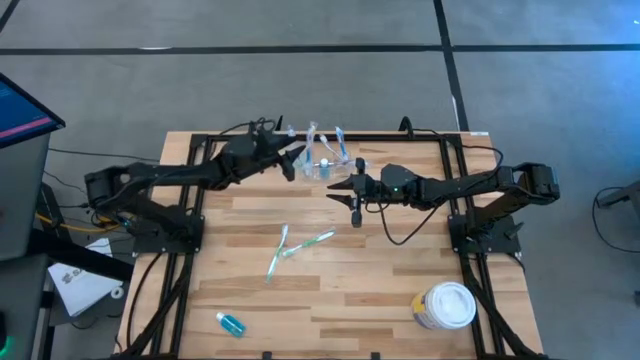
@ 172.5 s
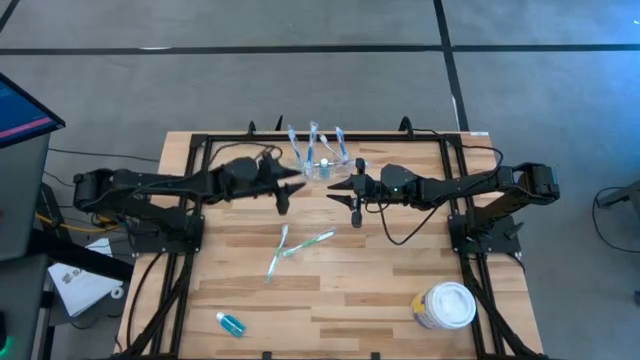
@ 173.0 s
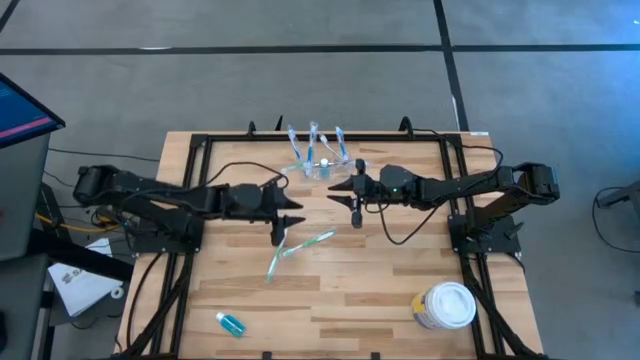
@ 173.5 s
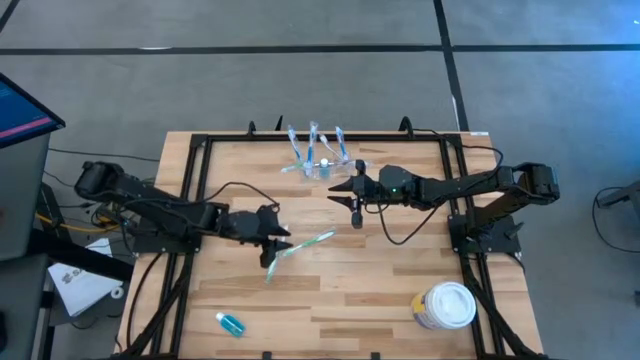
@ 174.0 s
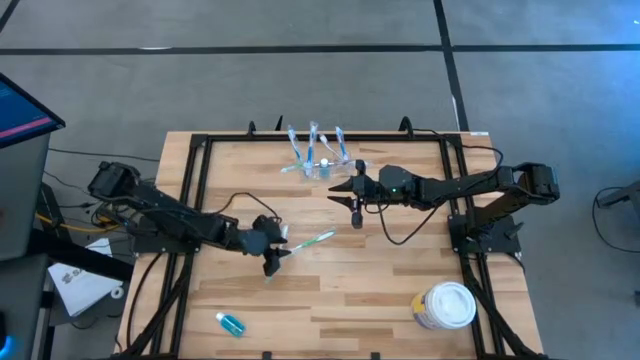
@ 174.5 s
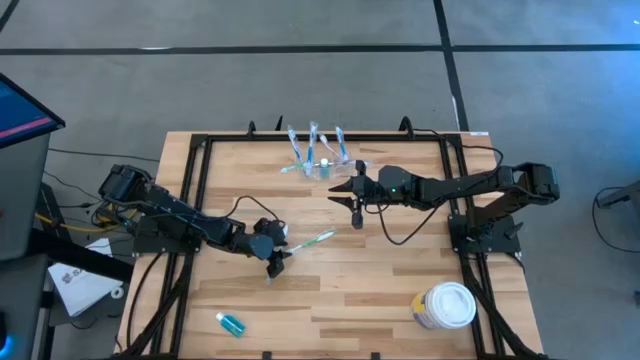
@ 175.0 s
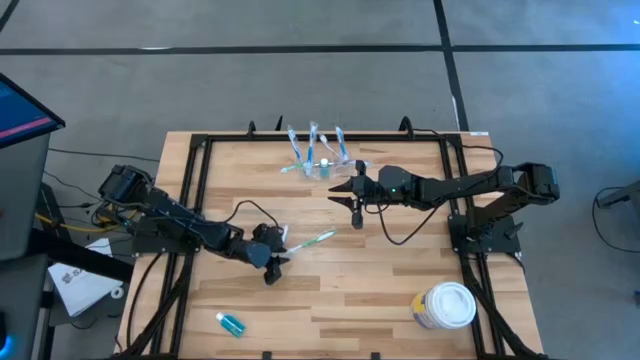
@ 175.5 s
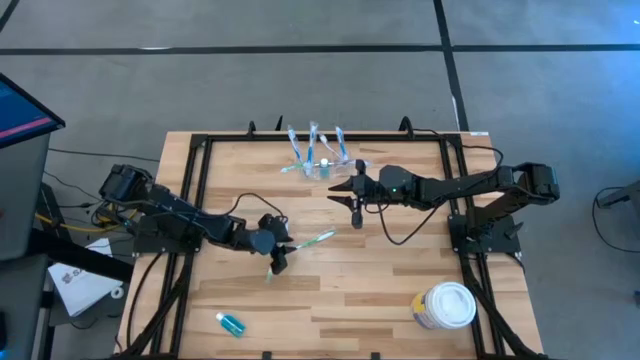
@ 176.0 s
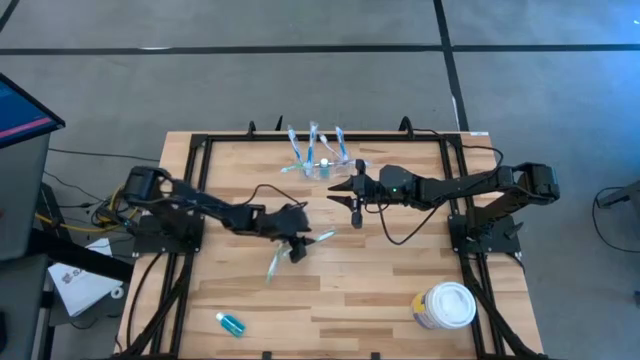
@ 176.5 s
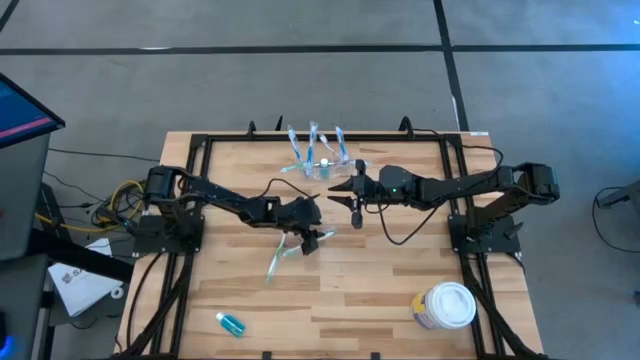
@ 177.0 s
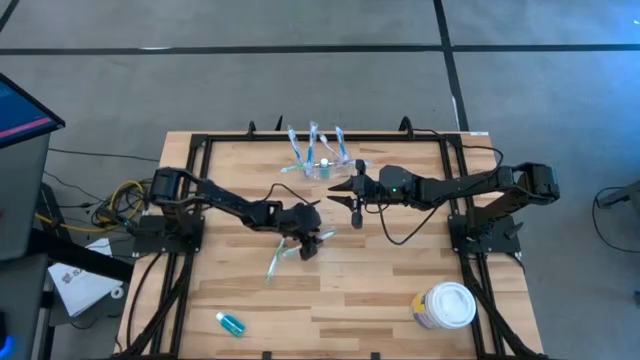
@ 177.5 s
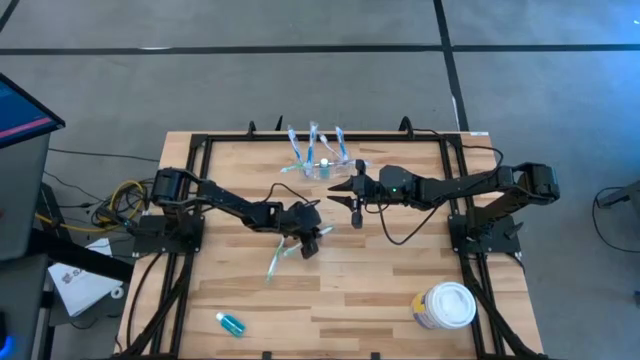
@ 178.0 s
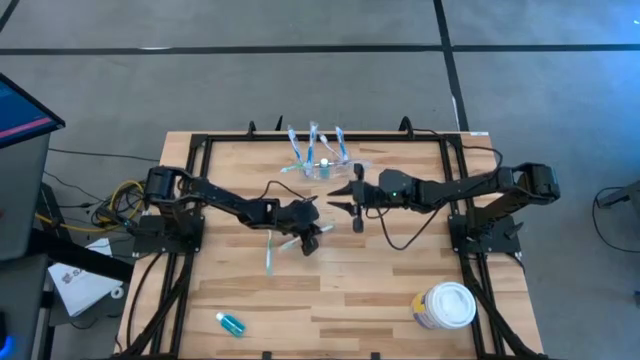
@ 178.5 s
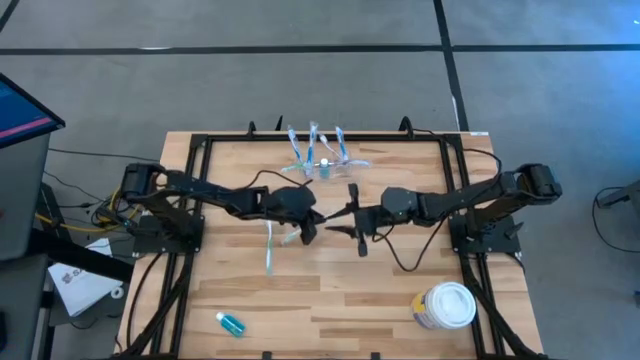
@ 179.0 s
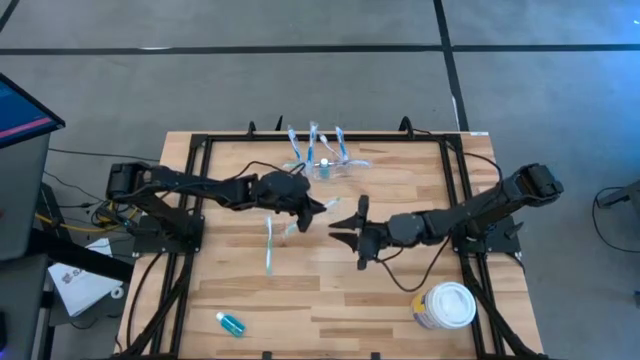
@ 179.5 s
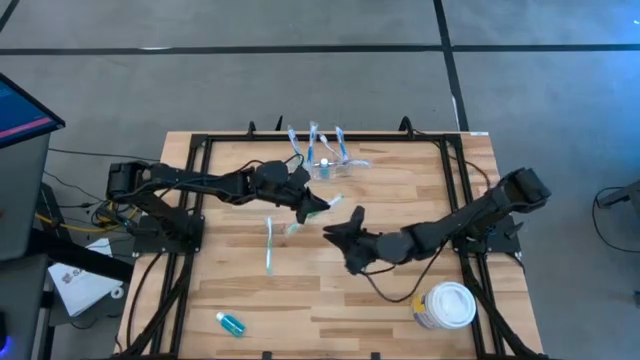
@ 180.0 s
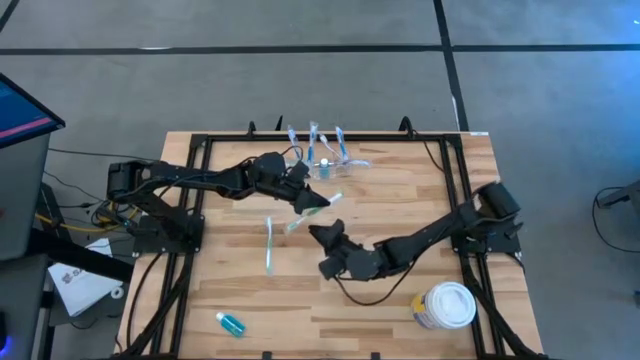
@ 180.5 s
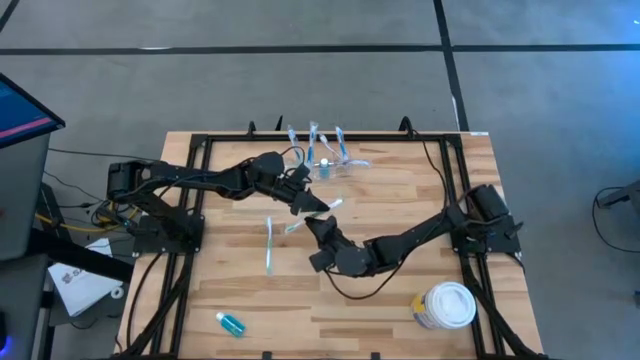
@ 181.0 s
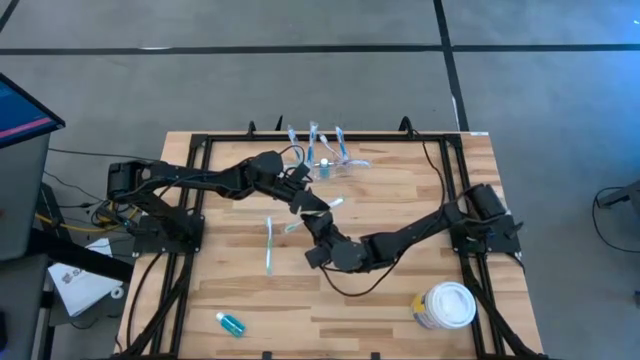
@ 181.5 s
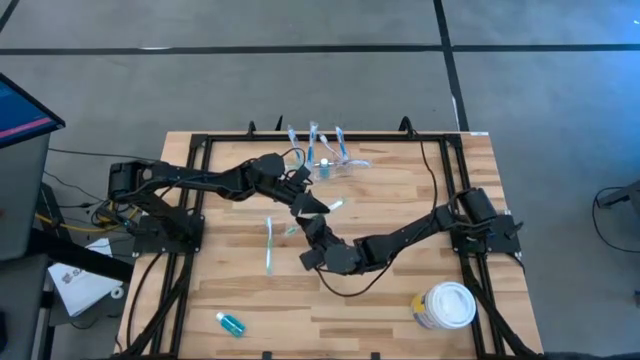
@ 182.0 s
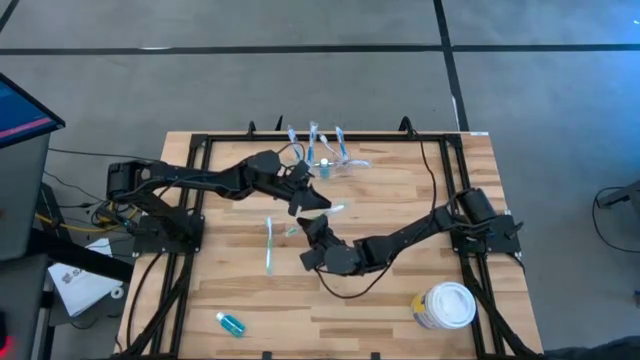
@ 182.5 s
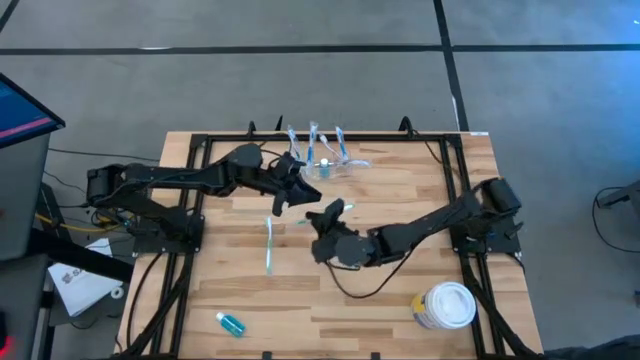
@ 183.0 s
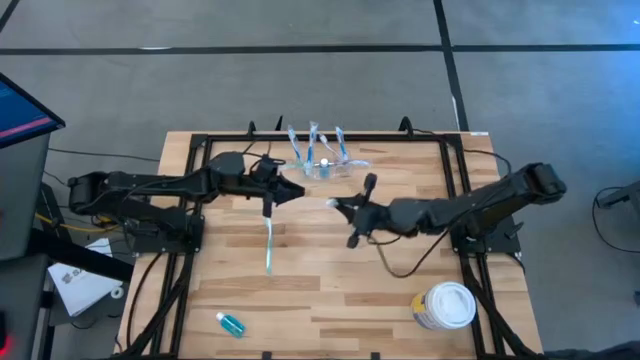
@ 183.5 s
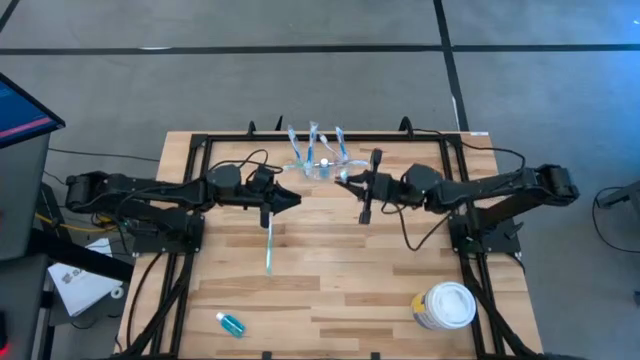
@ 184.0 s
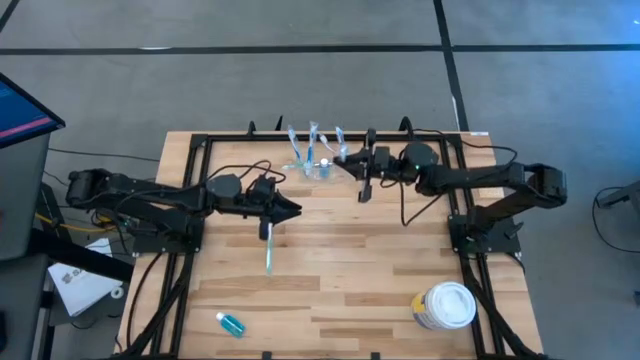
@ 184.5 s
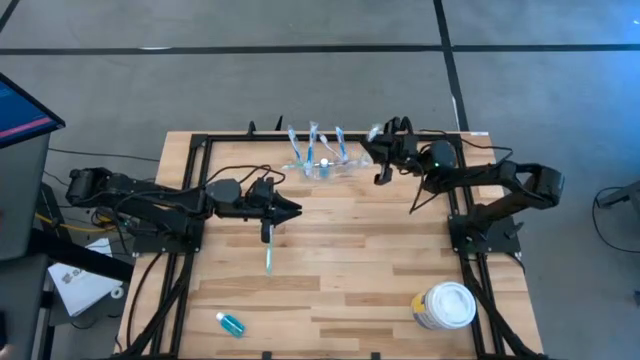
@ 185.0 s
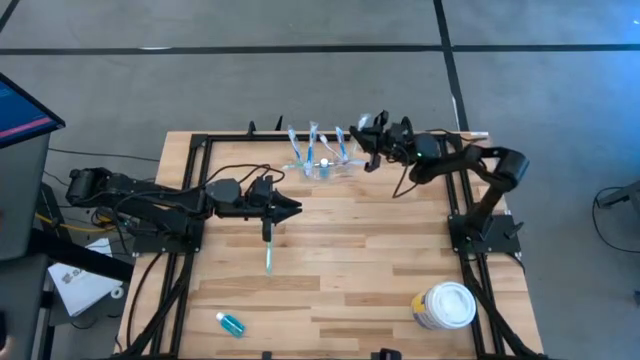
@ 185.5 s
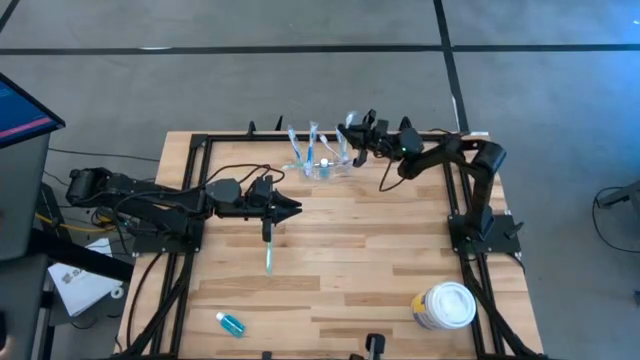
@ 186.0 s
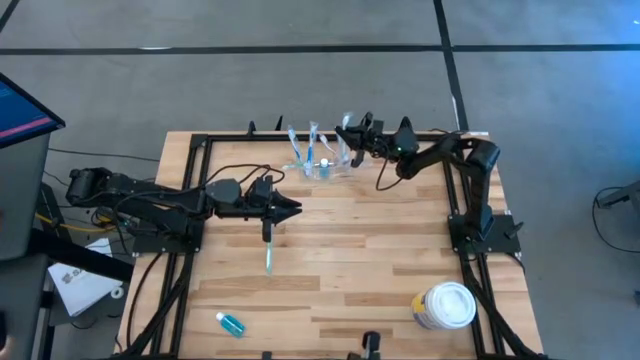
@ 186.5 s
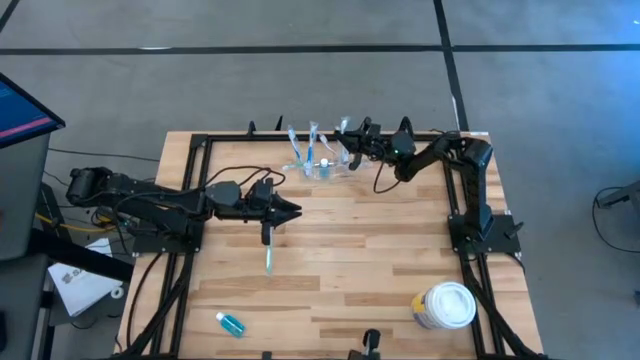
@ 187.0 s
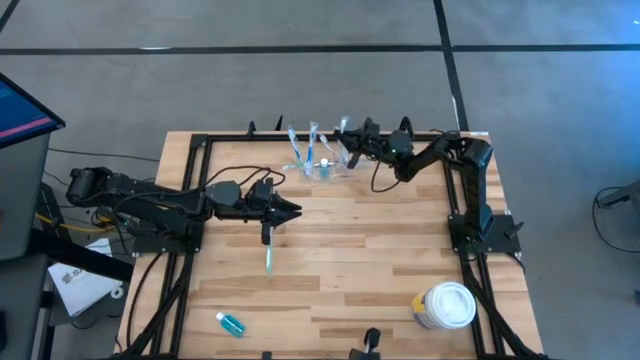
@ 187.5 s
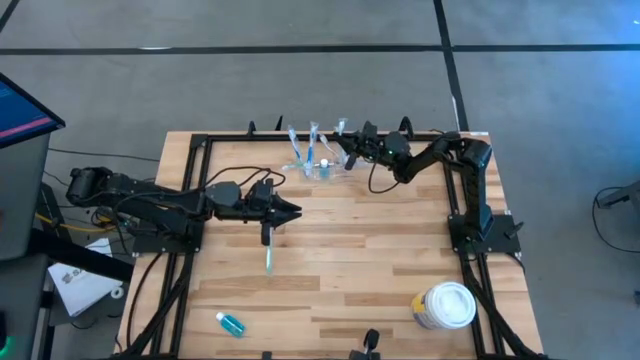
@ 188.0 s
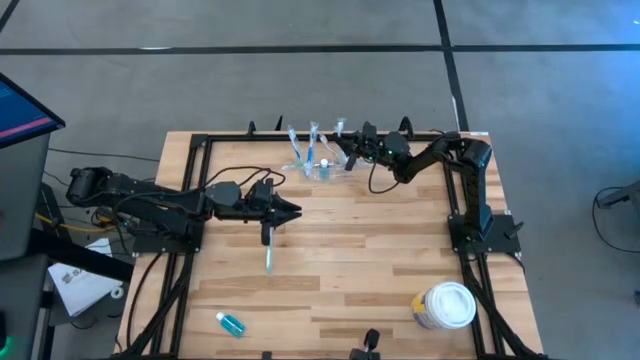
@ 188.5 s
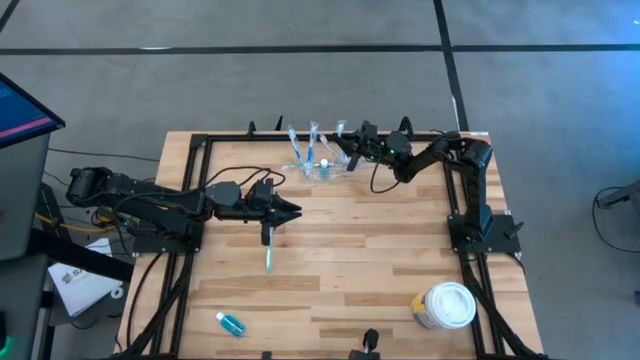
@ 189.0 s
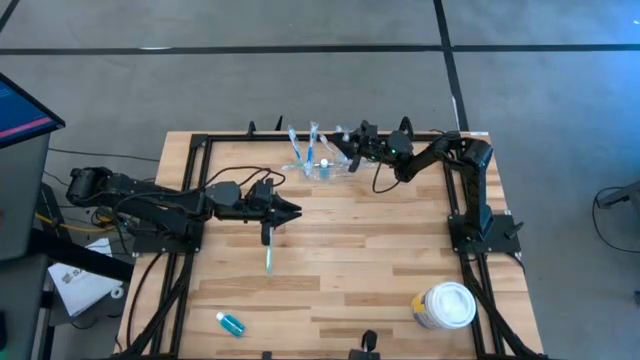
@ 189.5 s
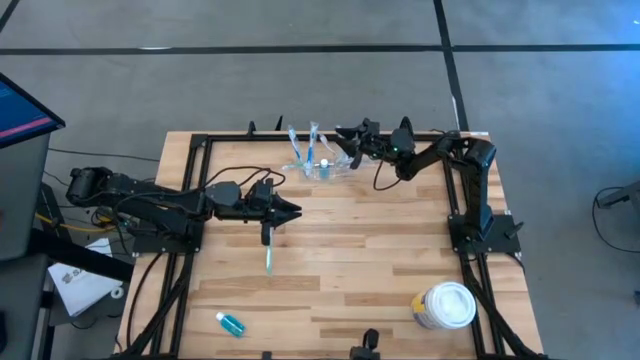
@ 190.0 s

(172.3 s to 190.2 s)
Task: Pick & Place toothbrushing station
Put the green toothbrush into the transparent organizer

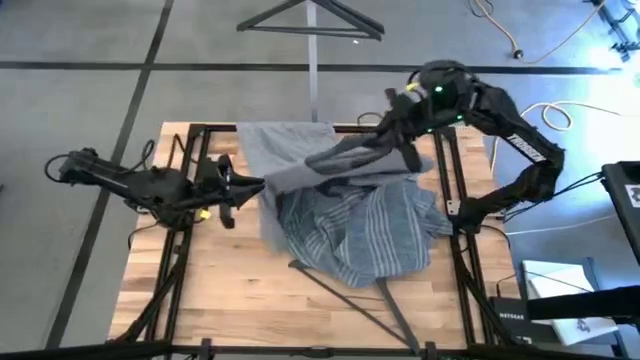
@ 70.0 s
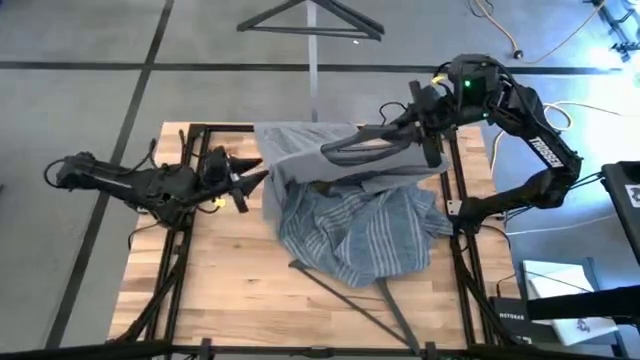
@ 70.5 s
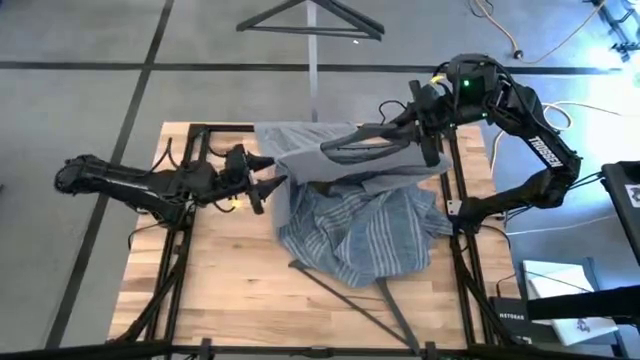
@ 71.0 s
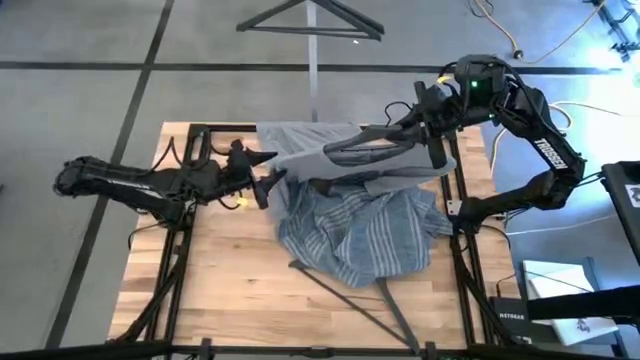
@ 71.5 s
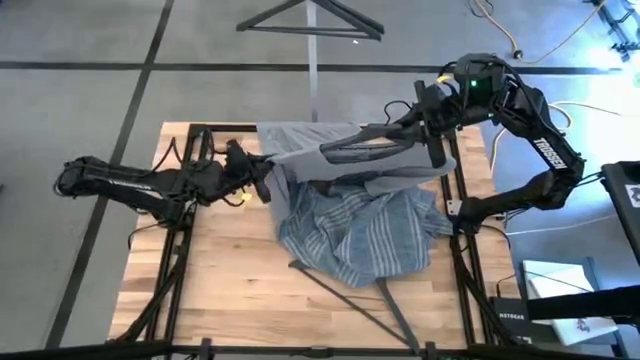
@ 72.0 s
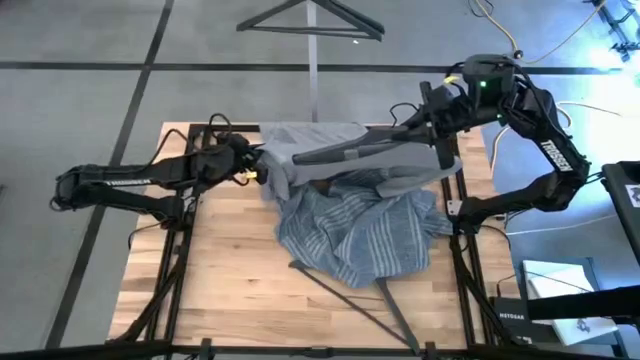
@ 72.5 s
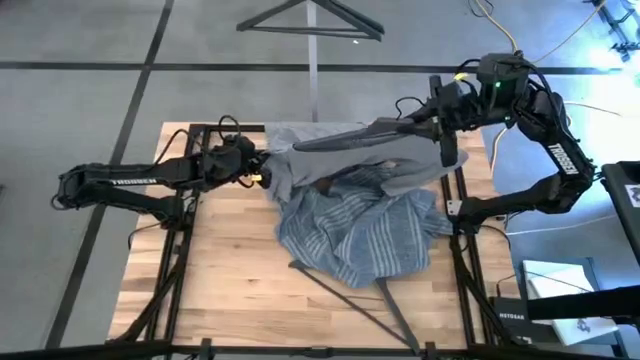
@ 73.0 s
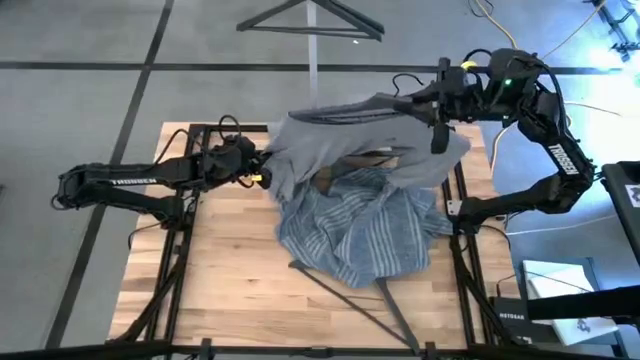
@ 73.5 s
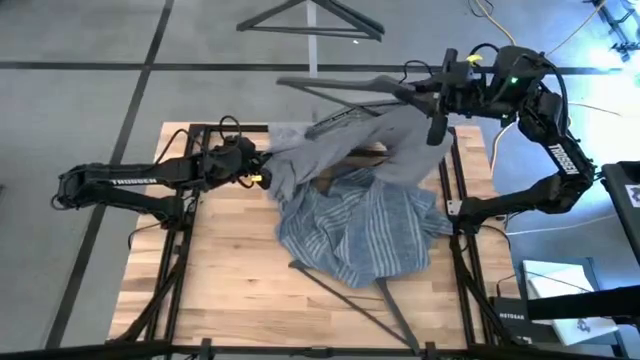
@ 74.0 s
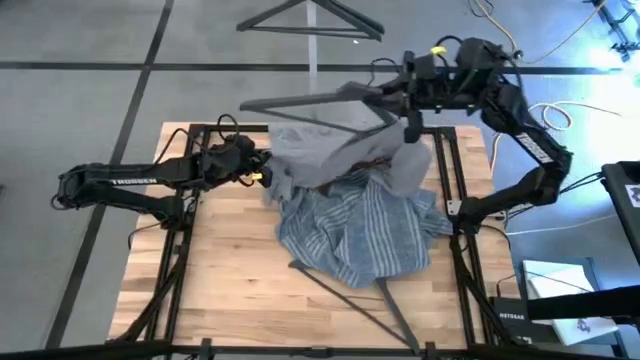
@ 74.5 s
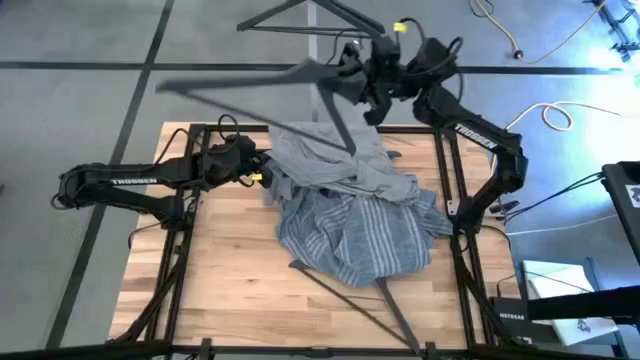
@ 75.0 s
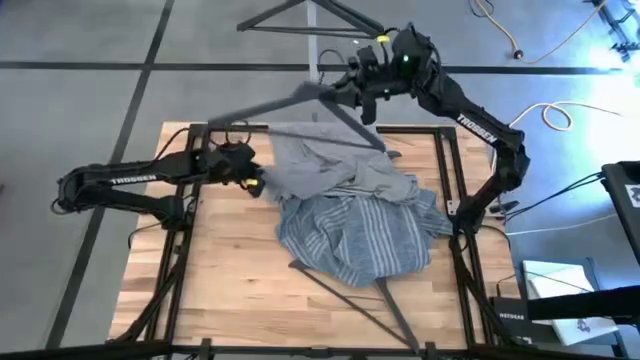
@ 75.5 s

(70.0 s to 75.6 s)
Task: Unhang clothes
Remove the shirt from the hanger
